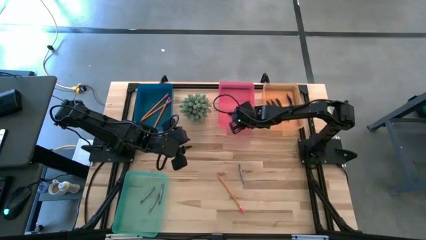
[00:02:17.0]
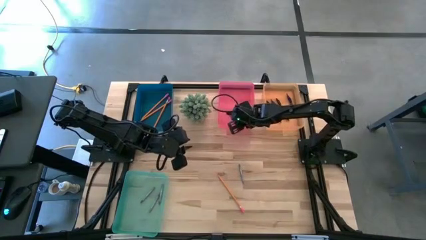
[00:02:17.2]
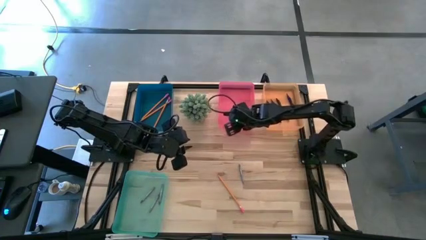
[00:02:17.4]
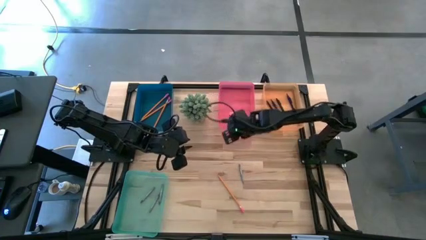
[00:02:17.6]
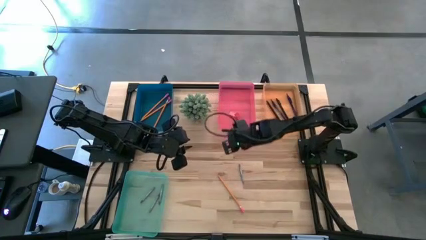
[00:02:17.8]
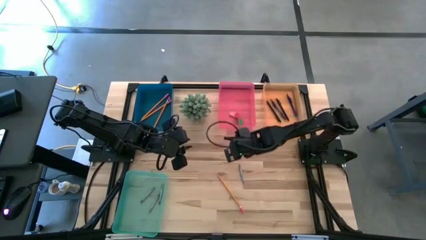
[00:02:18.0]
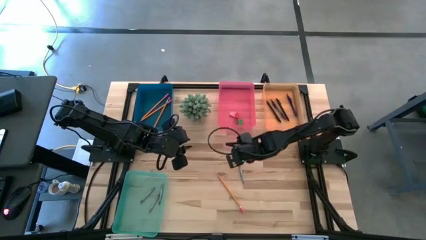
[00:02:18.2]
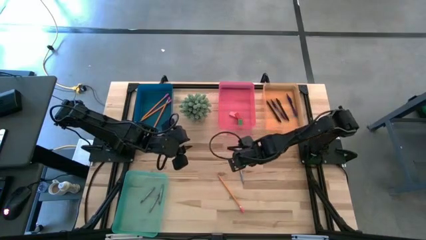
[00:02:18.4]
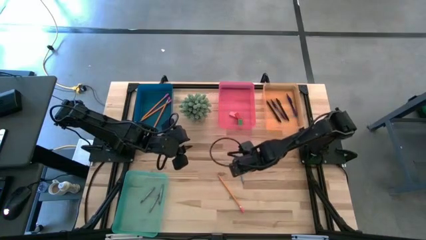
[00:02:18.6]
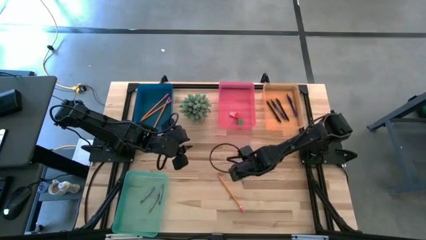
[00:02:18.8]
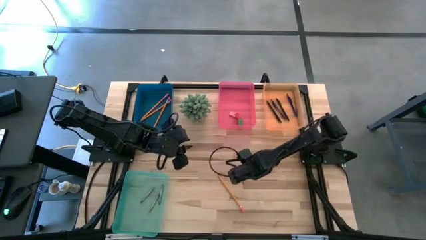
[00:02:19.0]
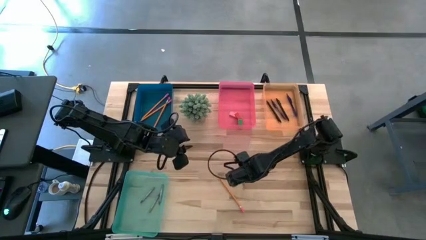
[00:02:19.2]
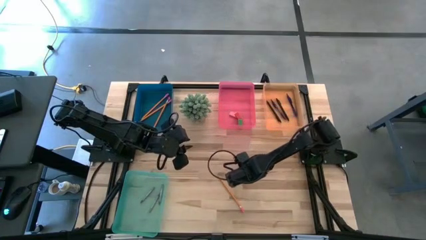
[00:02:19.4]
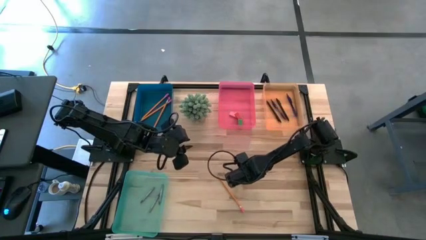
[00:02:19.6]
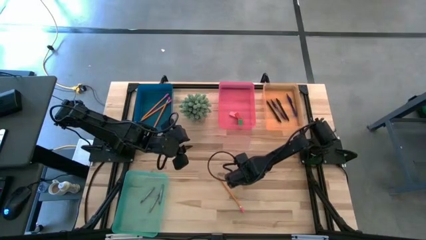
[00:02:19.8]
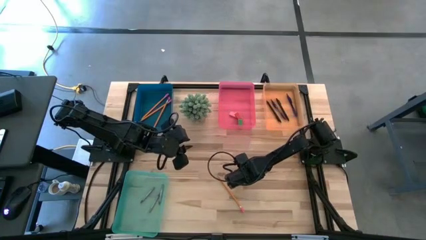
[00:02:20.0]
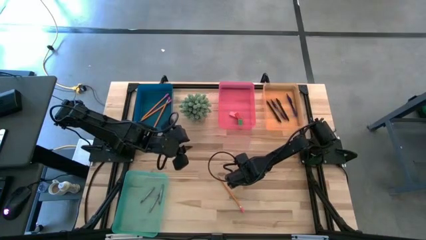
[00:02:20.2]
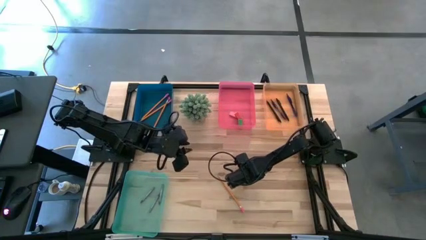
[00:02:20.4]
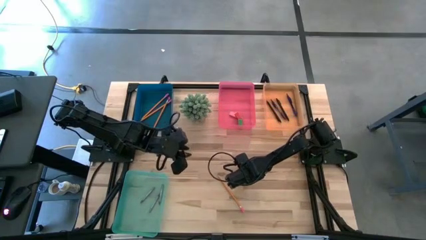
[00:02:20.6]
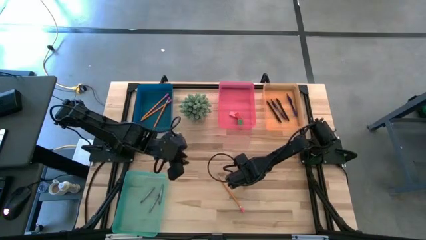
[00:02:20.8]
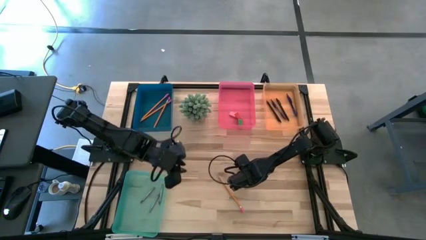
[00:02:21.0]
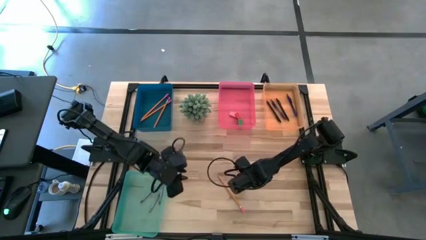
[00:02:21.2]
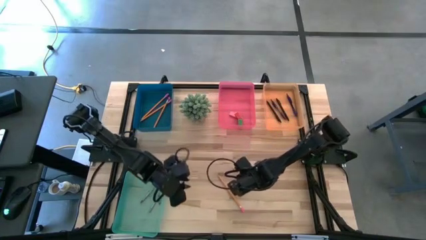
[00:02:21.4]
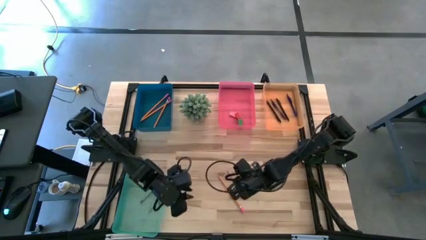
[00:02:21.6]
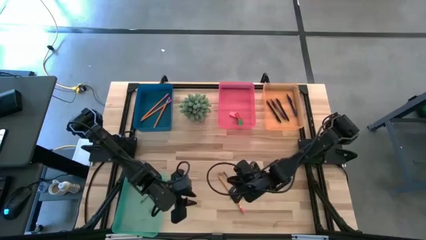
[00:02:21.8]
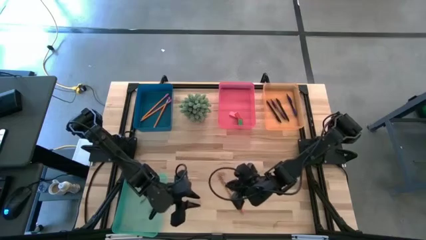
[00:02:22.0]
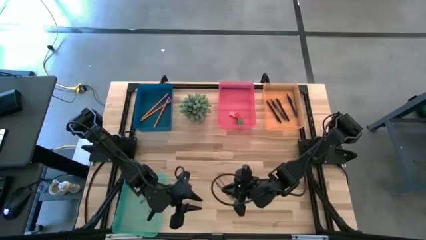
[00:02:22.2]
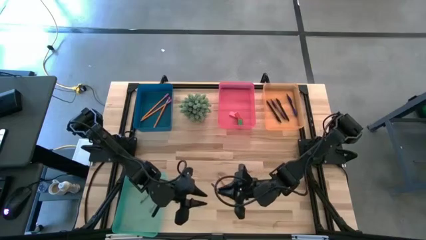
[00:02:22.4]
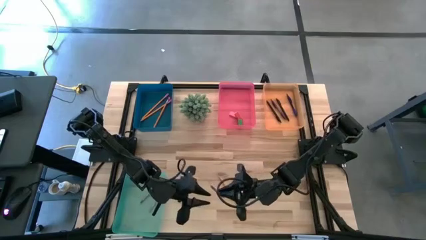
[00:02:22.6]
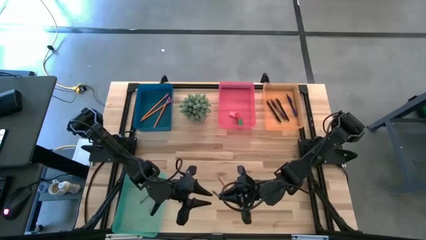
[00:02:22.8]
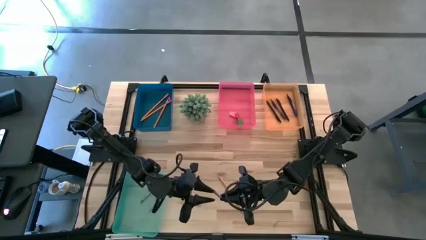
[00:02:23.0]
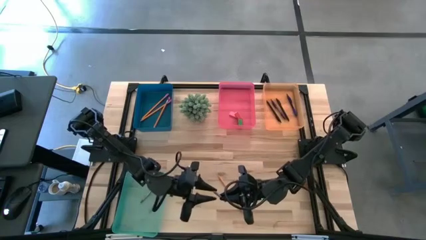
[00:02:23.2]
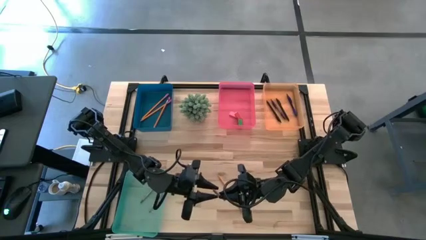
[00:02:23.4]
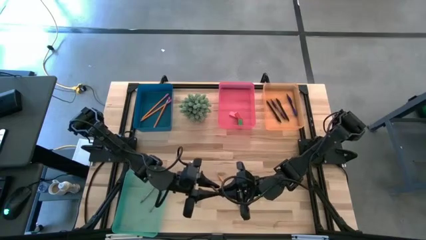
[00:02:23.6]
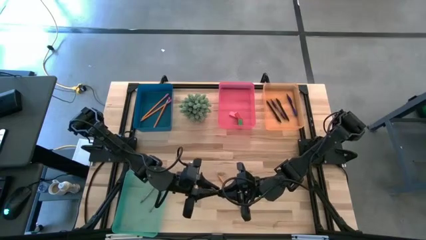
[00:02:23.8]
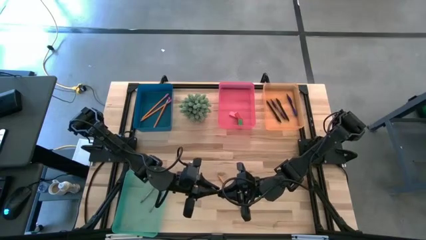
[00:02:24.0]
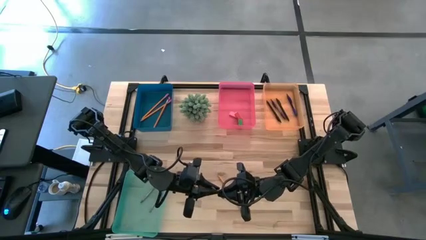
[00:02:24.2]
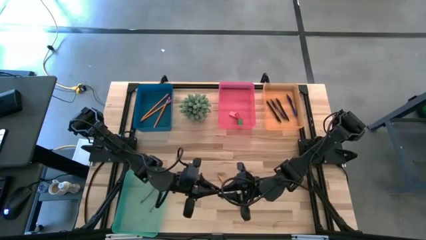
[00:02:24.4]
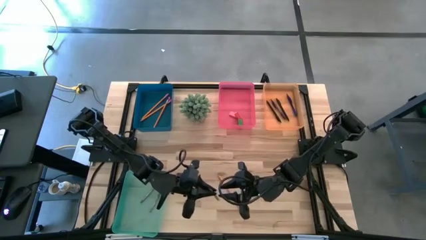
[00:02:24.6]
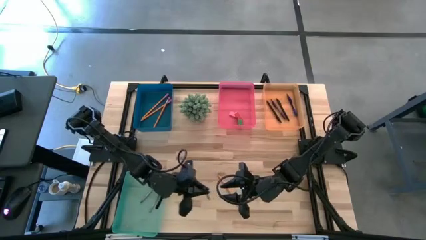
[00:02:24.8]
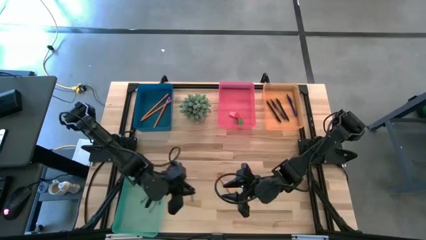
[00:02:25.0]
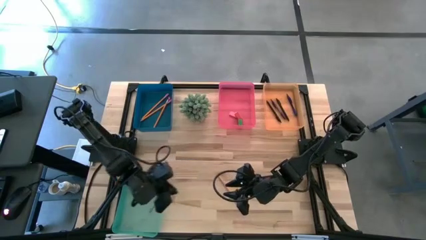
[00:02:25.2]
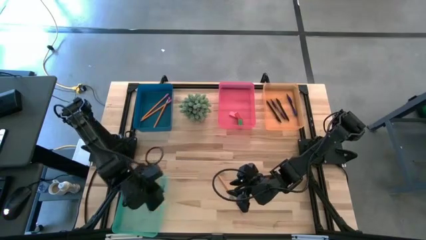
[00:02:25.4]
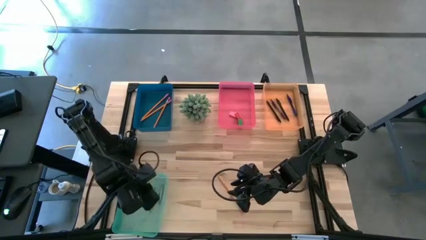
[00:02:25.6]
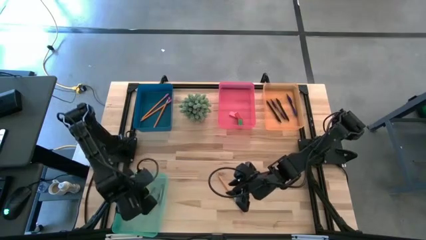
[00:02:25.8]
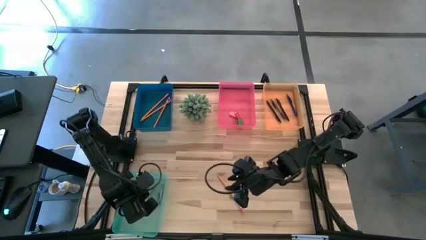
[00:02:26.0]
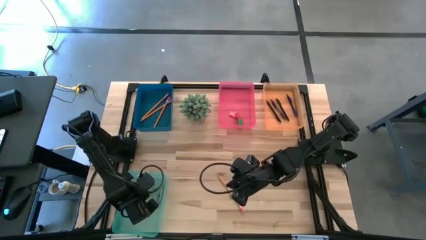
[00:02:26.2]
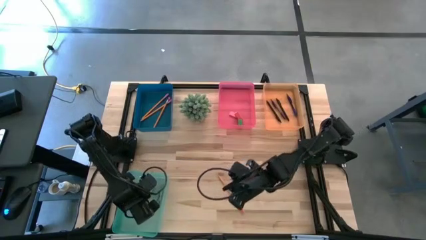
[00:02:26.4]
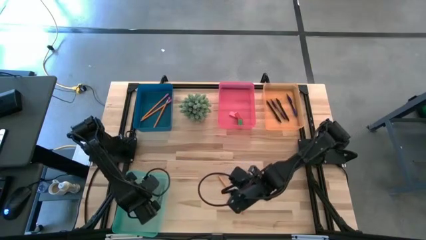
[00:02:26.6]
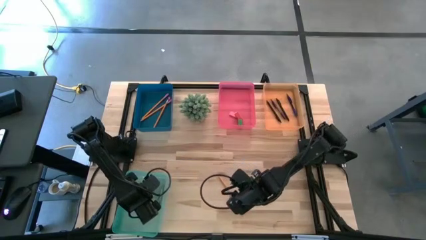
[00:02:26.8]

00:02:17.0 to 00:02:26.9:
Task: Sort crayons/erasers/pens/pencils in bins
Put the gray crayon into the green bin

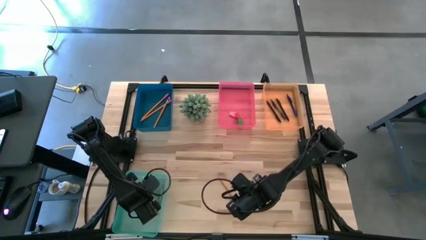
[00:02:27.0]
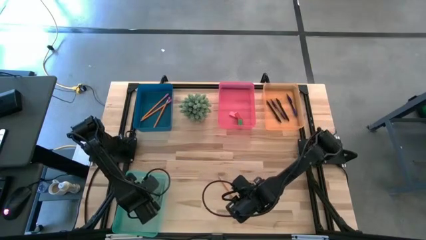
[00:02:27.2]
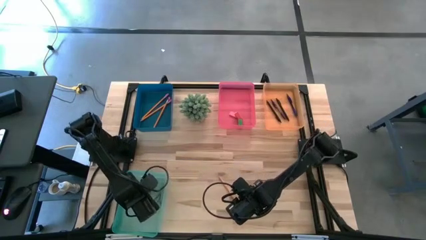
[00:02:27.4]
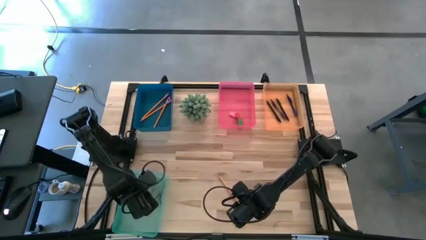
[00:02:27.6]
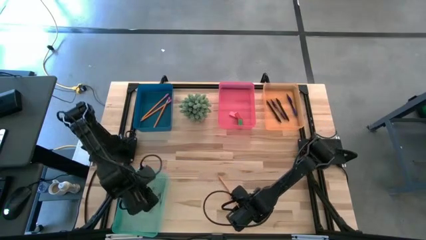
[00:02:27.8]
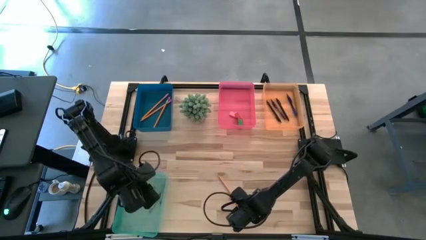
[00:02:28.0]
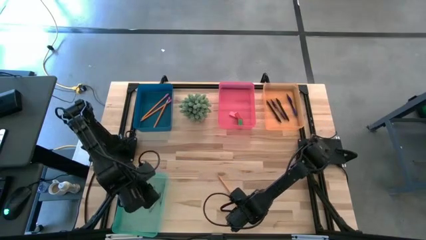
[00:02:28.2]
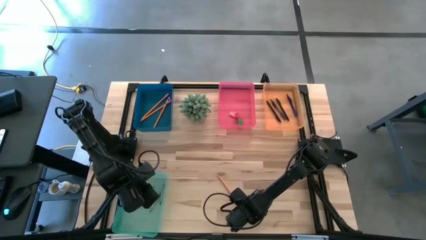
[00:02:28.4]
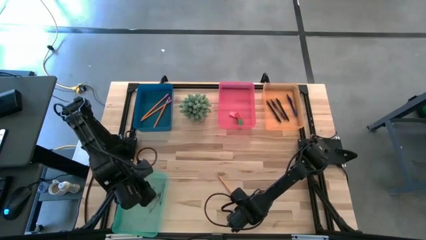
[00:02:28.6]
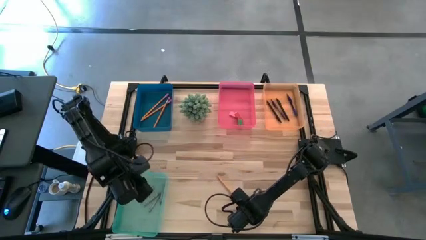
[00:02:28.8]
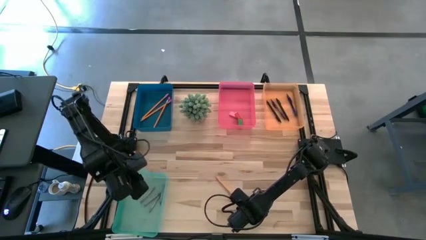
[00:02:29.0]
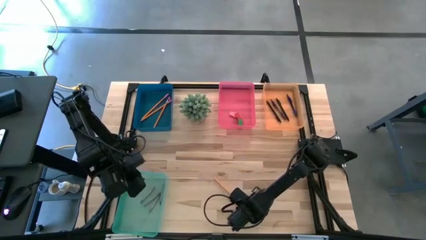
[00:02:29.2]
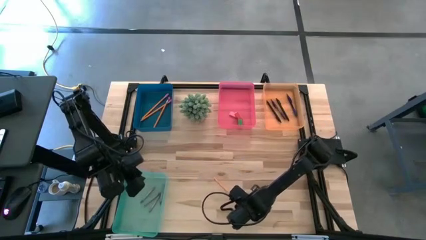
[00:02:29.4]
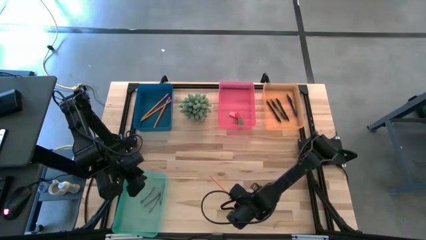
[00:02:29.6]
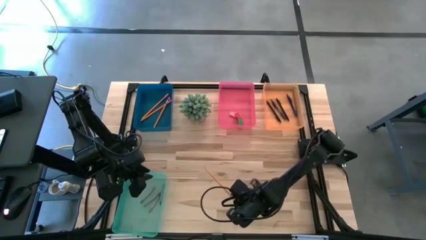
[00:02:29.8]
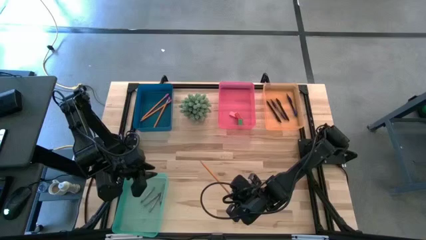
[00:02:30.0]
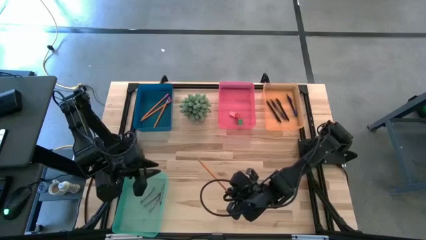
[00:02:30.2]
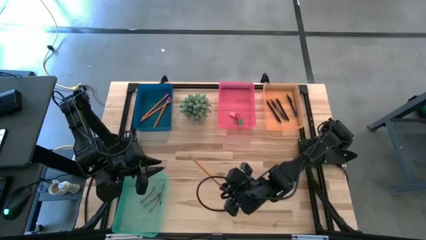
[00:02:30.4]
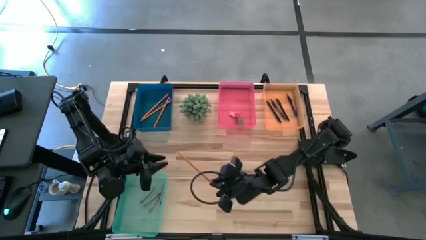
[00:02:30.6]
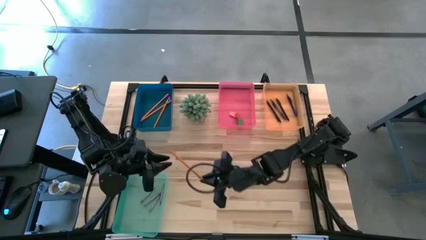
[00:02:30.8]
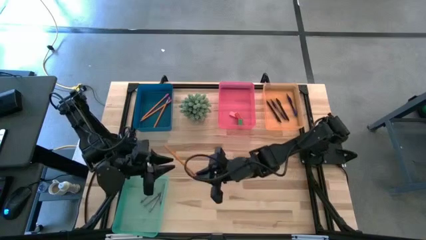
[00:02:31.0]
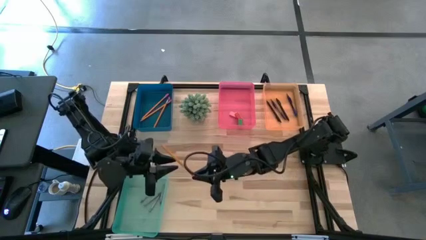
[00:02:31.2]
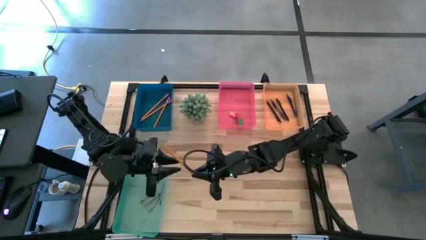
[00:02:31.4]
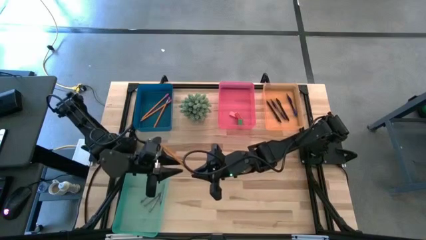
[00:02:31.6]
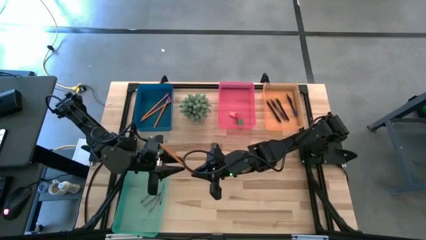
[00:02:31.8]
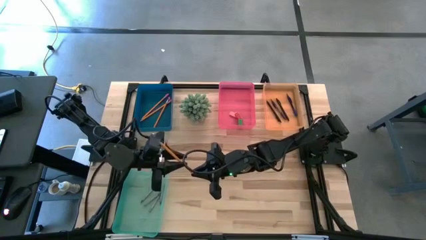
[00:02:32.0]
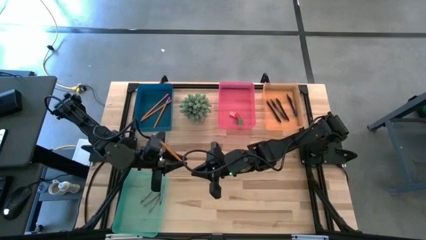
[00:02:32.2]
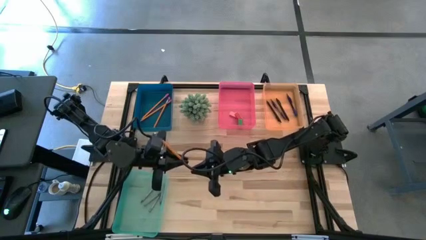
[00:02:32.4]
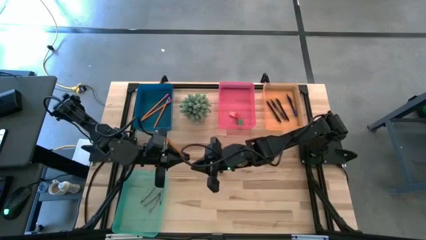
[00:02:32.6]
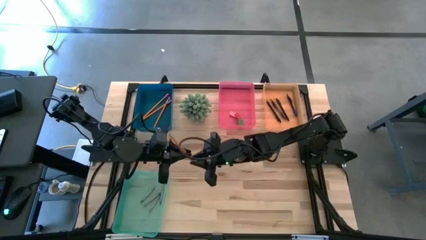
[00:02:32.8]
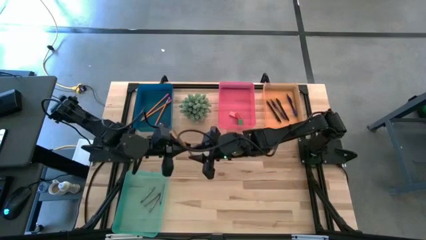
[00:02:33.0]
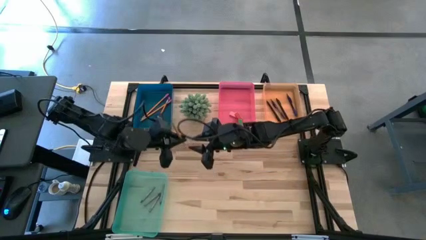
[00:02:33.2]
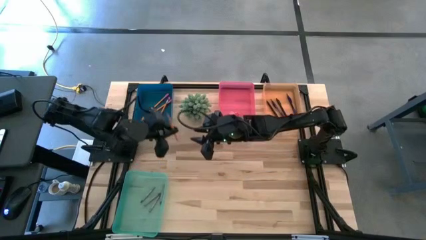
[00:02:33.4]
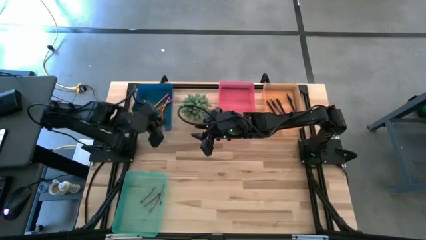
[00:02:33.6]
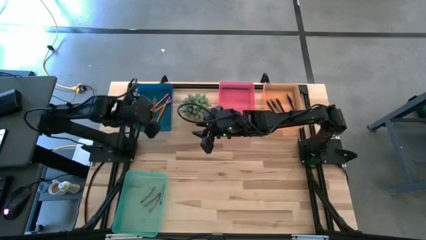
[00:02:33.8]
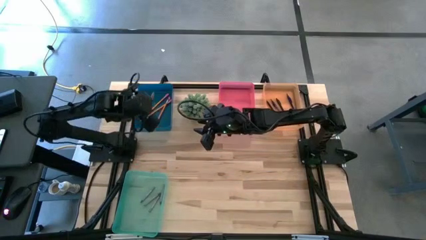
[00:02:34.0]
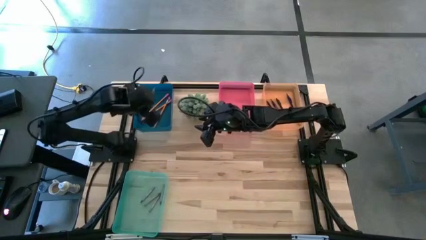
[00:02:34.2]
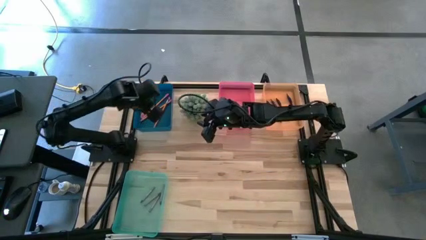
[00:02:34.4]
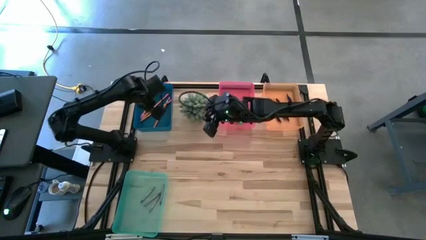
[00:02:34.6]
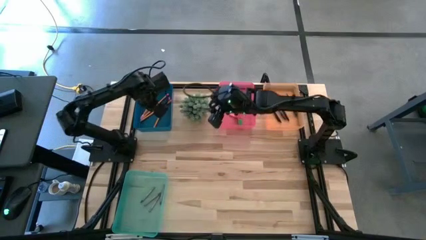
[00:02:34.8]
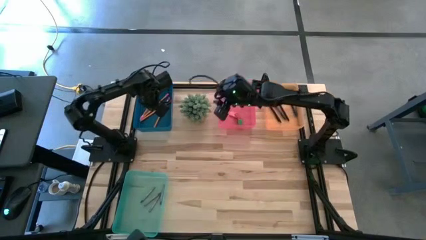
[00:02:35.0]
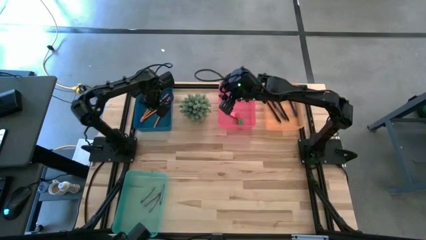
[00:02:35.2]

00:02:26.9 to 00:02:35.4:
Put the orange pencil into the blue bin
